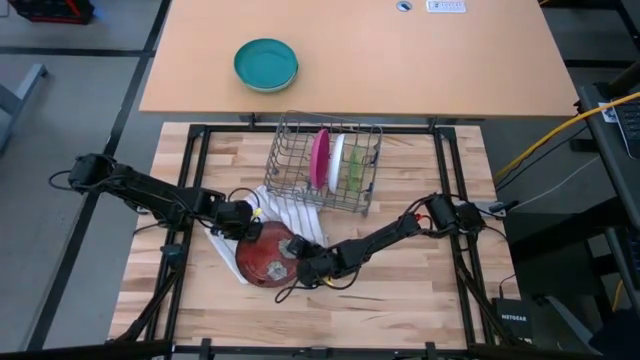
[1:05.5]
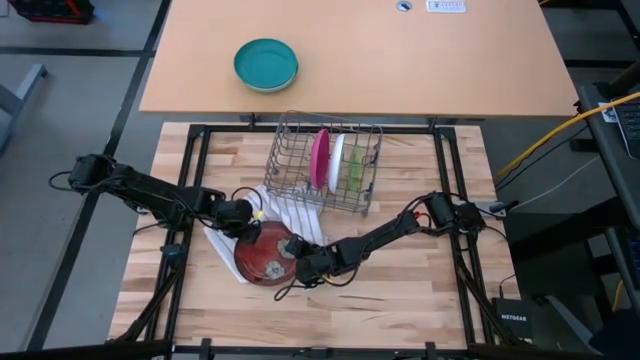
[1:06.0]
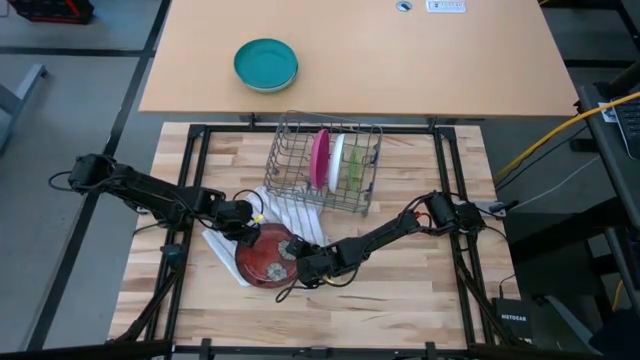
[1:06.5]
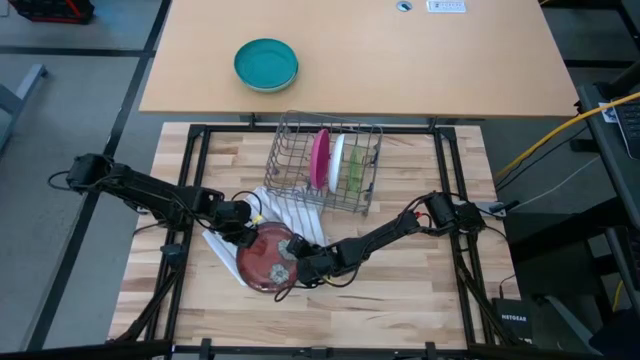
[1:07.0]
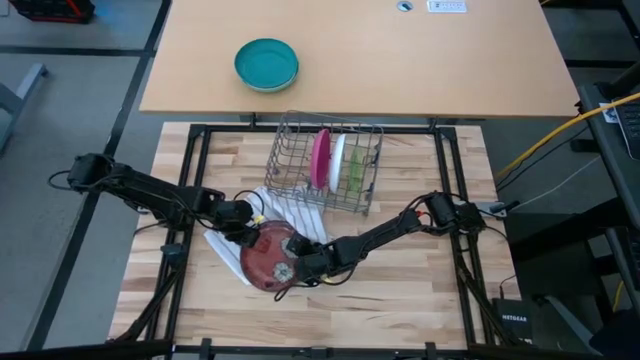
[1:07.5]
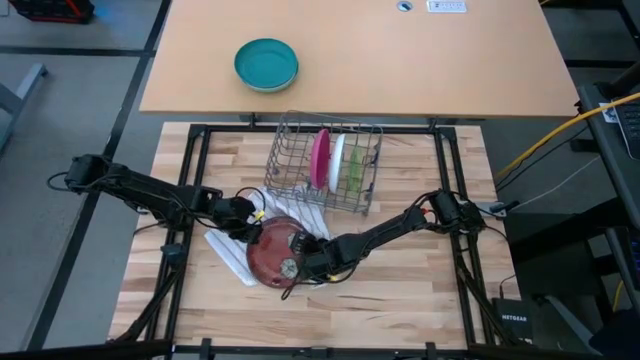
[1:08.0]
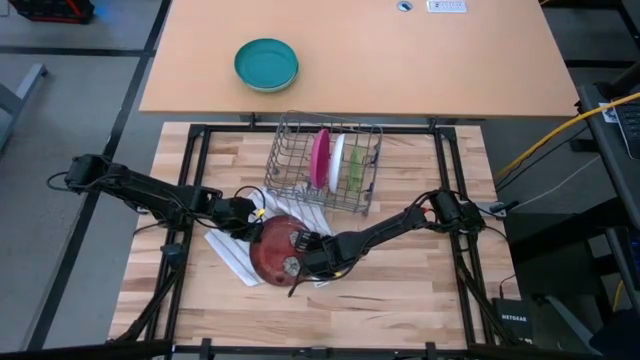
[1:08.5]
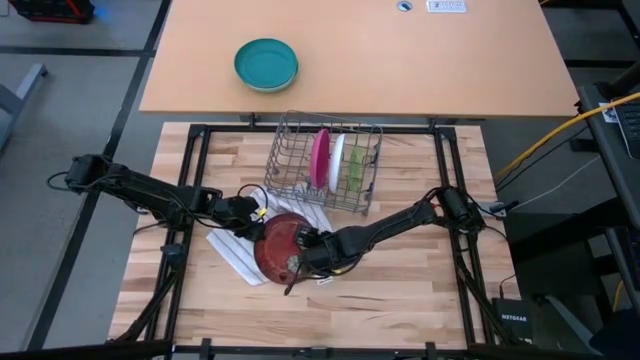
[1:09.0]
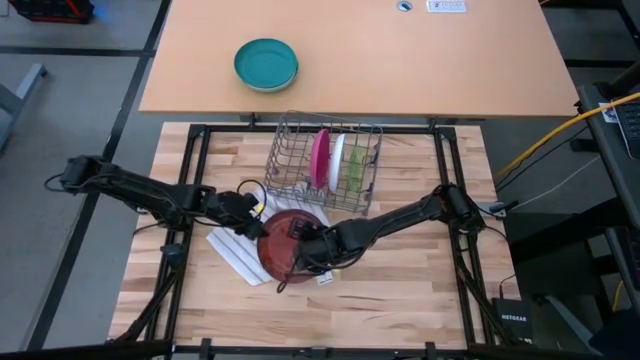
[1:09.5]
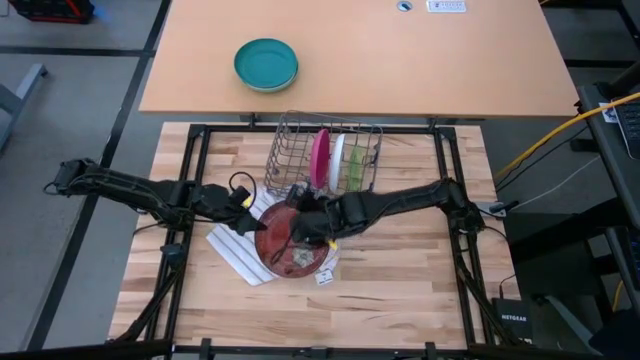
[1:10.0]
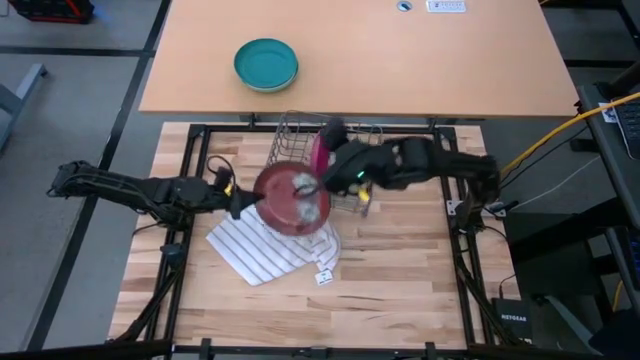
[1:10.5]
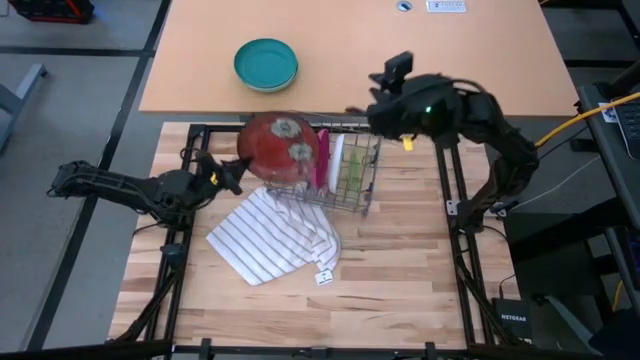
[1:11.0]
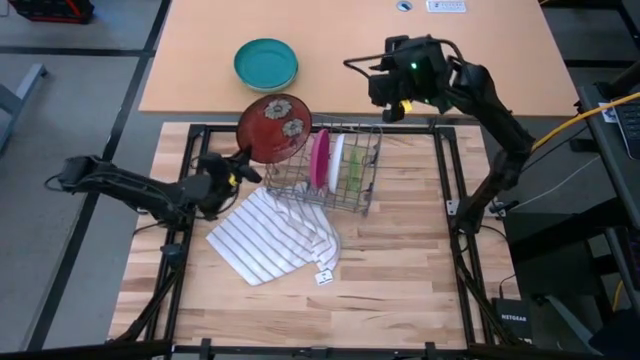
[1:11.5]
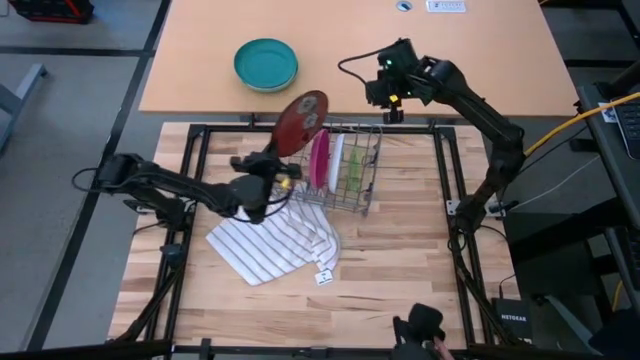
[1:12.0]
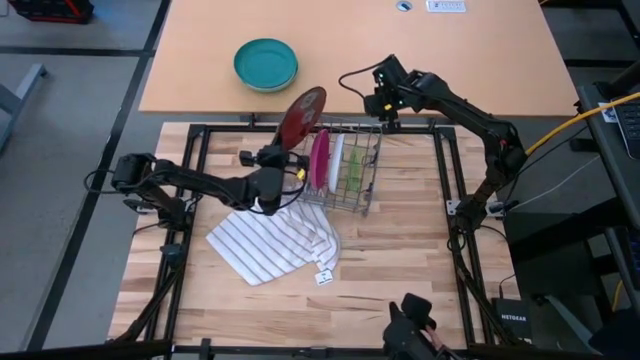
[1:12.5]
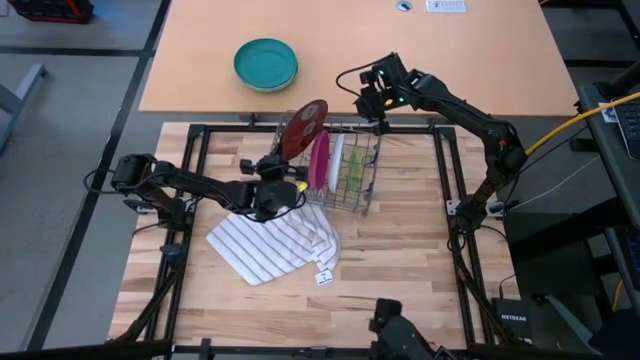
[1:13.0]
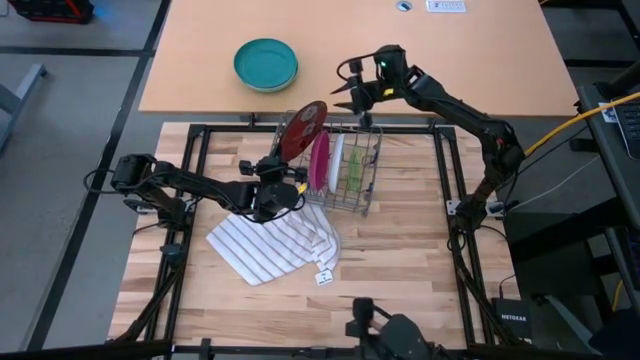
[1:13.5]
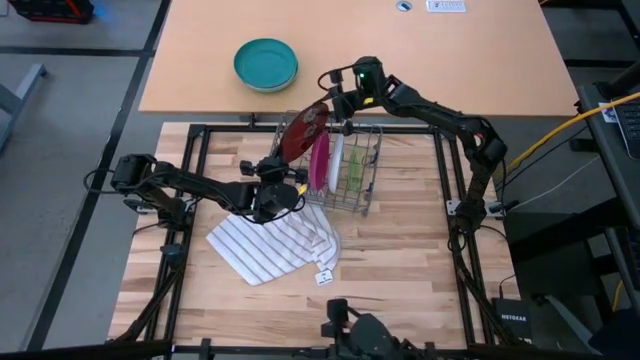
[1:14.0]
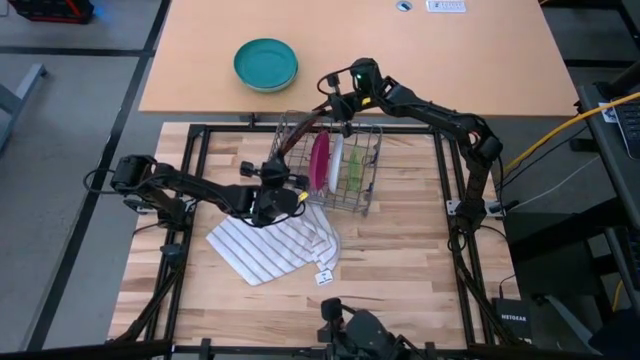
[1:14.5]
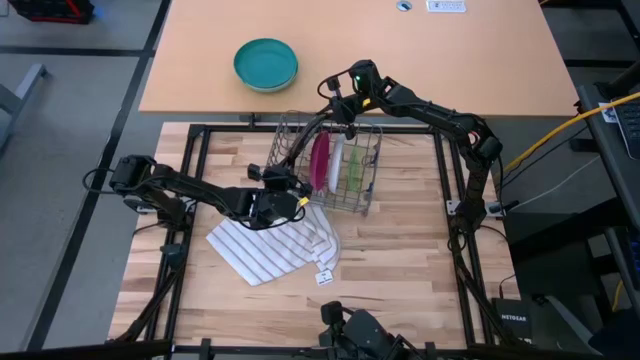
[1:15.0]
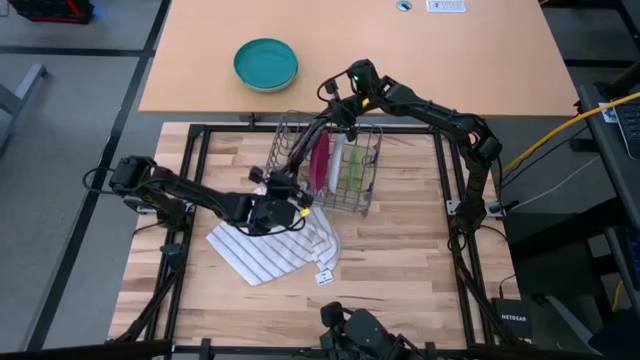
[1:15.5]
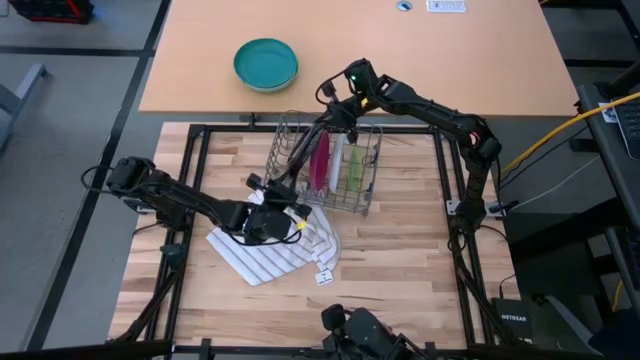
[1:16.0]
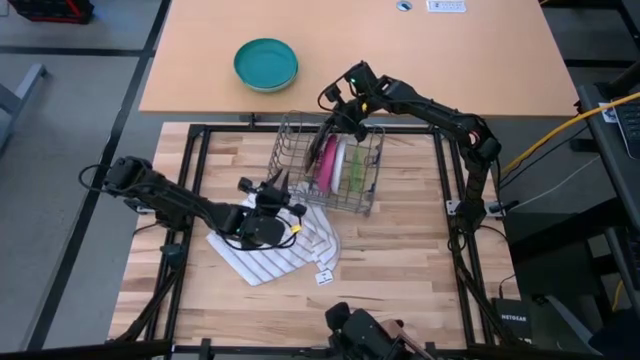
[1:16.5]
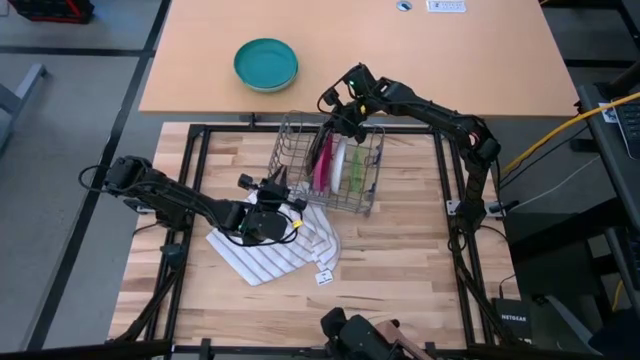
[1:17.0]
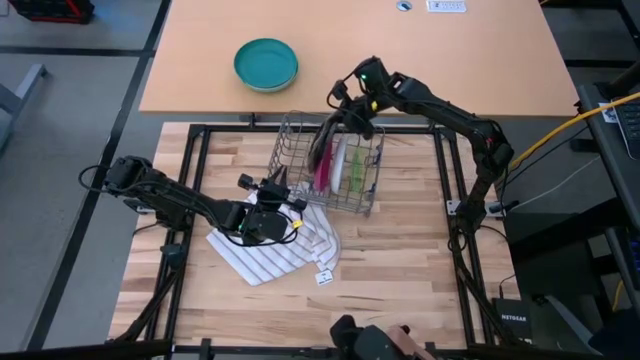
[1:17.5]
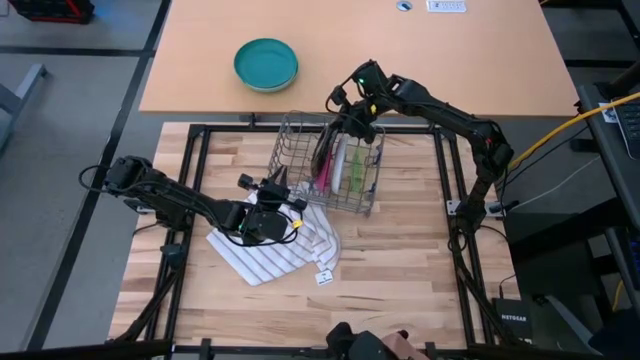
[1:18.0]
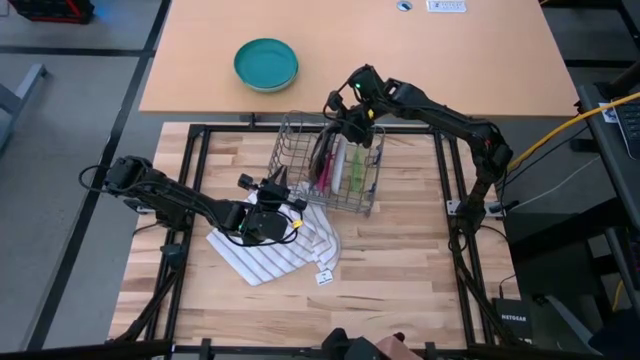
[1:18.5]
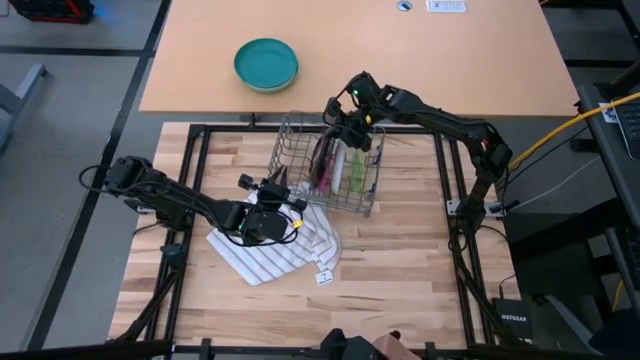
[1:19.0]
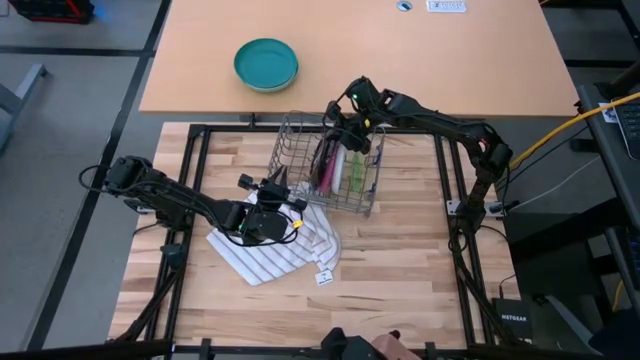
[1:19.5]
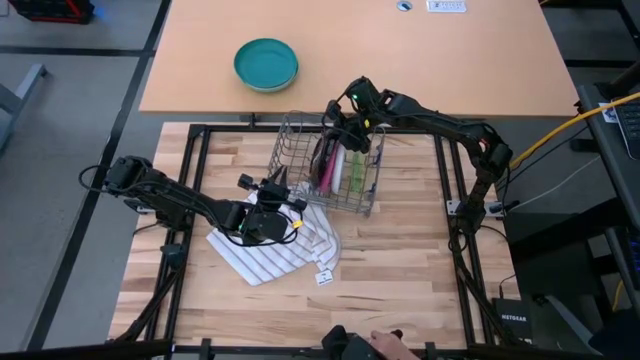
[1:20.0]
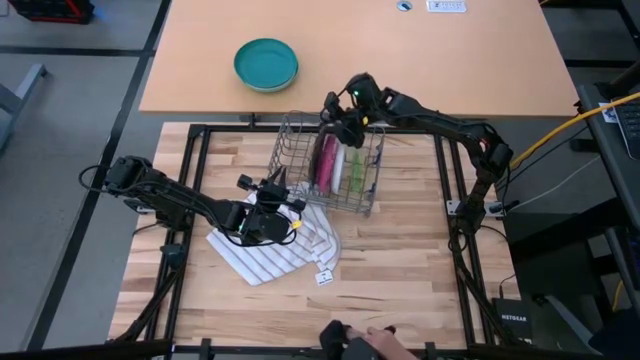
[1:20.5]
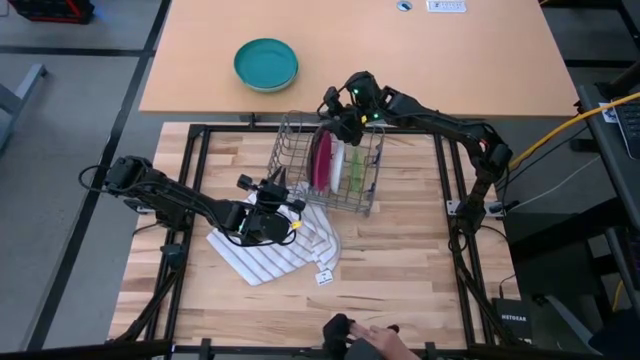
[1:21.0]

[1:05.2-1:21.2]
Task: Sort dishes
Put the red plate in the dish rack

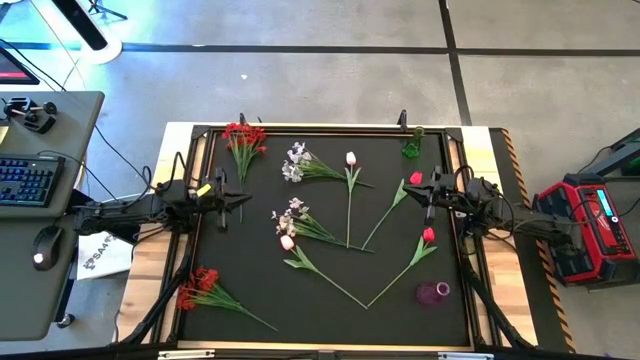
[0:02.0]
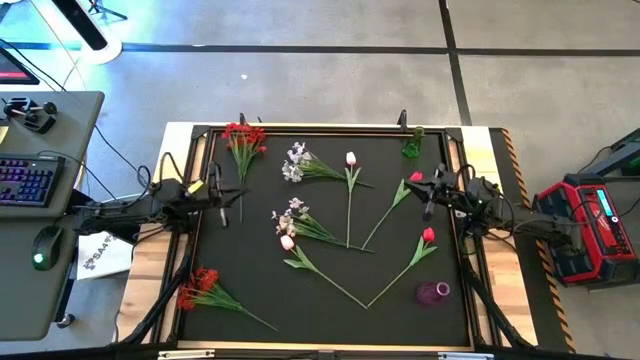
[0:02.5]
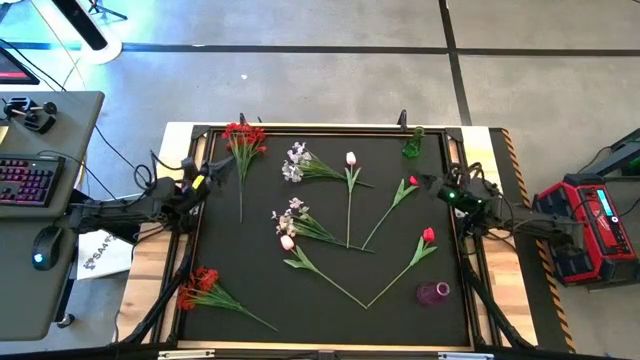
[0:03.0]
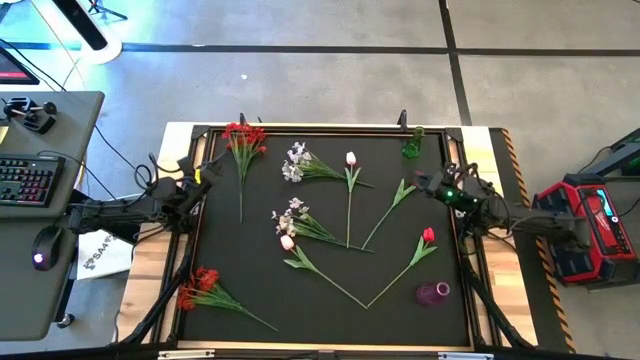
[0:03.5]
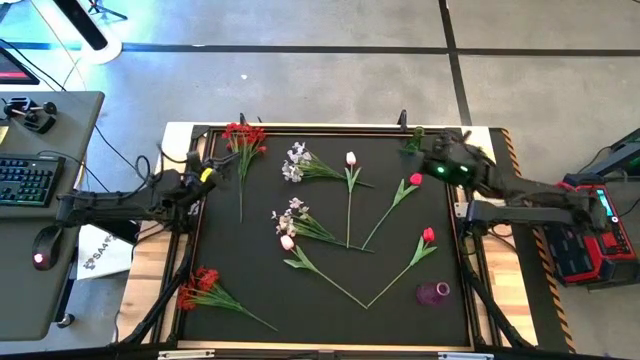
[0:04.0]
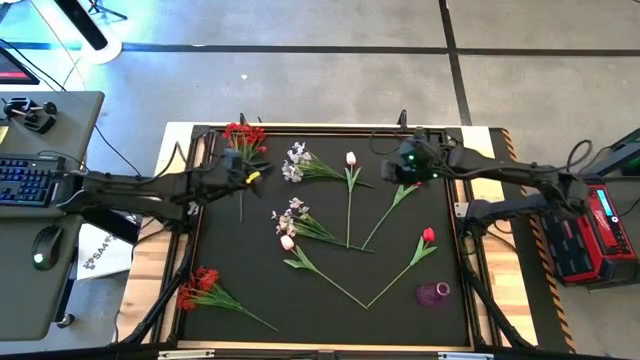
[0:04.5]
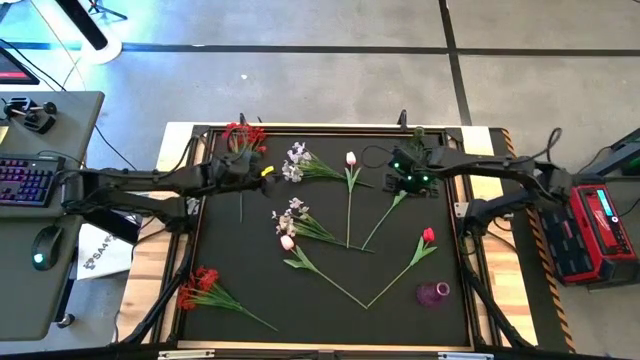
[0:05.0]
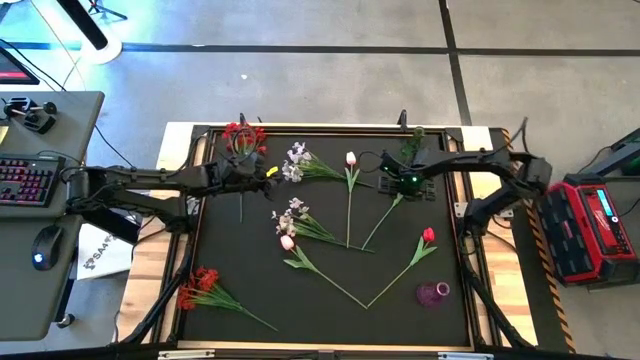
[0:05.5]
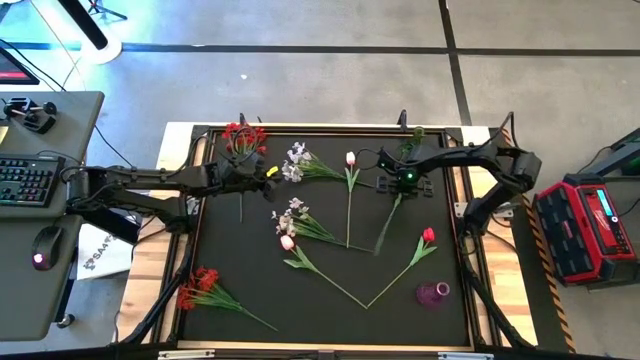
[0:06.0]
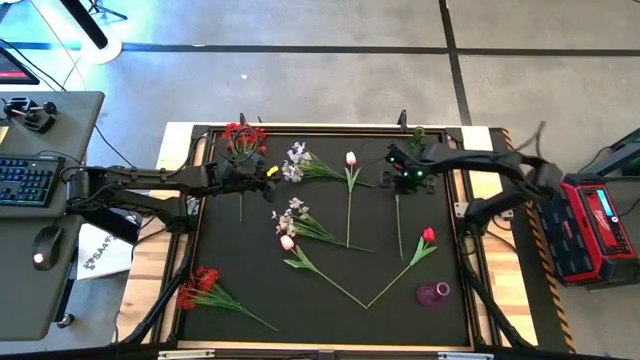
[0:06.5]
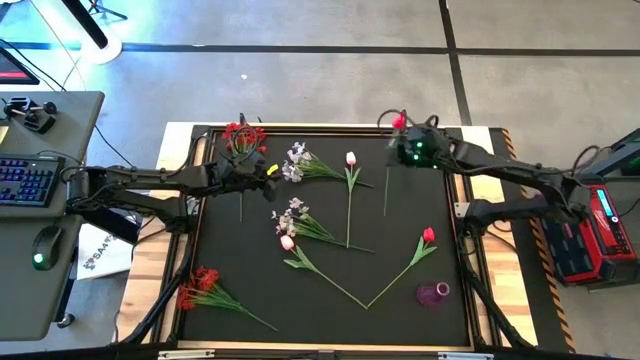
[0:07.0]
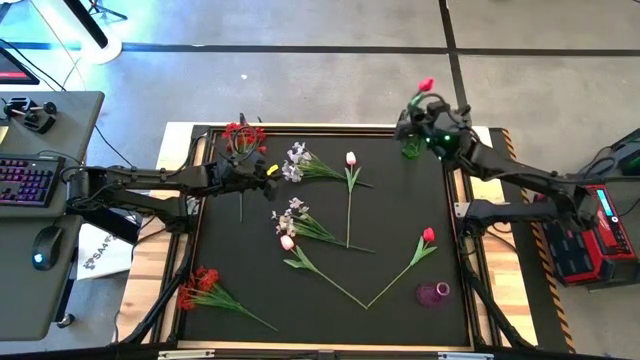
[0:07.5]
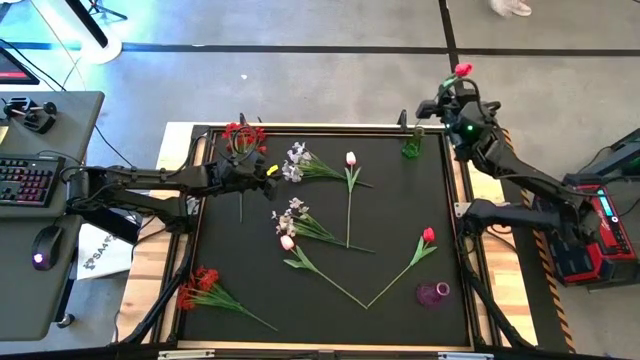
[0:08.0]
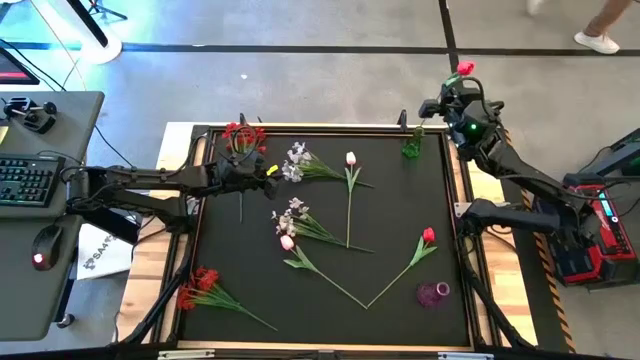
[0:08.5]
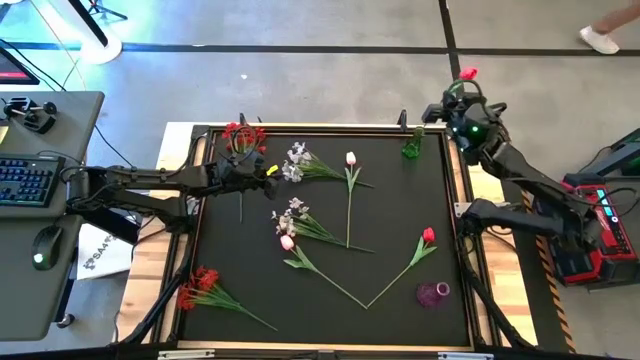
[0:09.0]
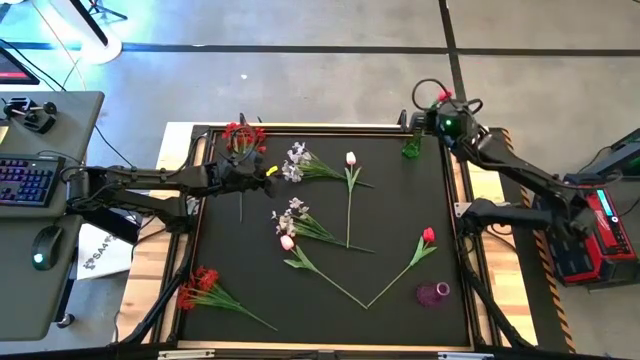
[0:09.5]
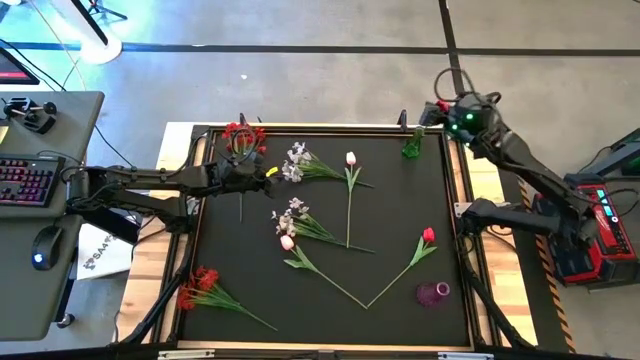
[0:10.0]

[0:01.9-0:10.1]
Task: Sort flowers into vase by color
Put the top red tulip into the green vase
